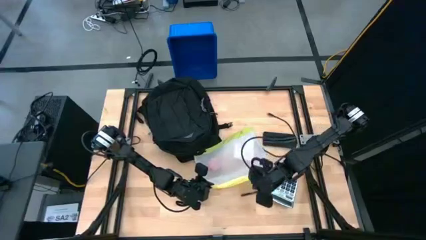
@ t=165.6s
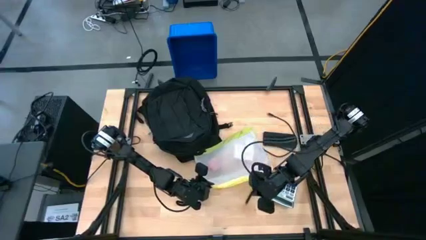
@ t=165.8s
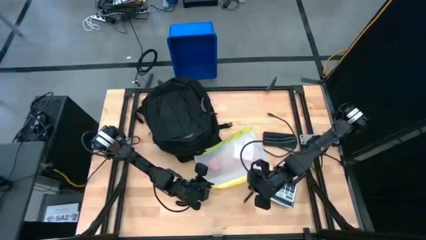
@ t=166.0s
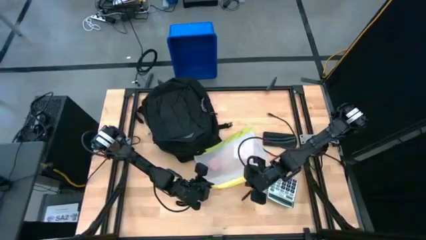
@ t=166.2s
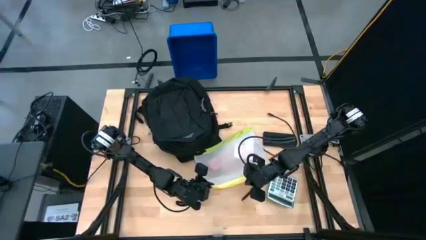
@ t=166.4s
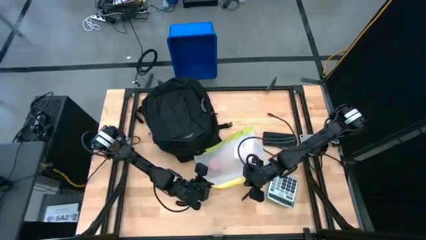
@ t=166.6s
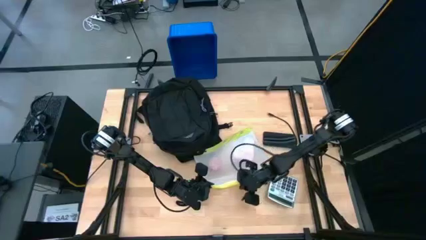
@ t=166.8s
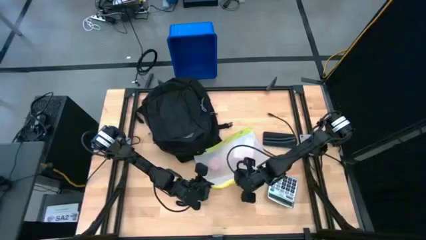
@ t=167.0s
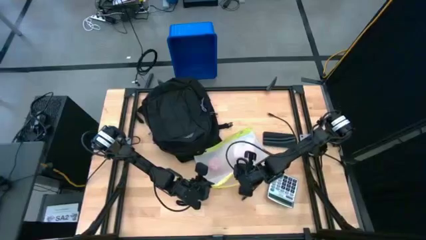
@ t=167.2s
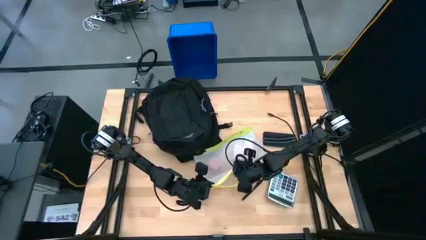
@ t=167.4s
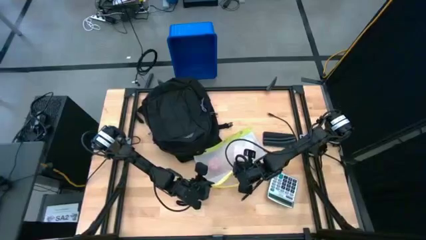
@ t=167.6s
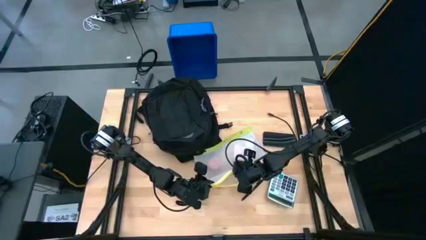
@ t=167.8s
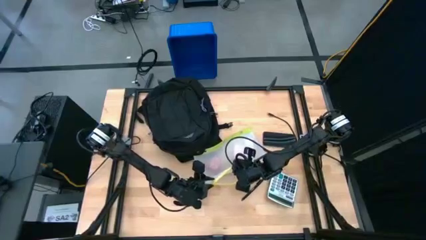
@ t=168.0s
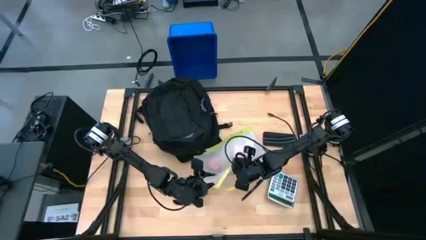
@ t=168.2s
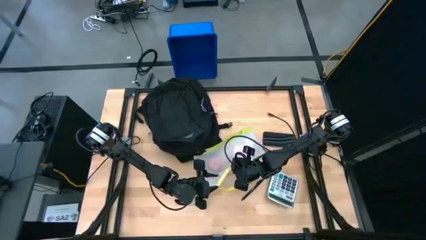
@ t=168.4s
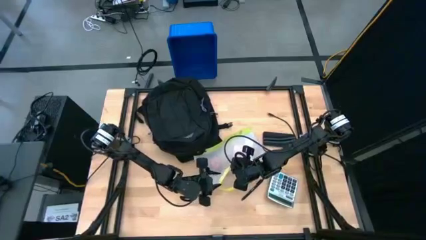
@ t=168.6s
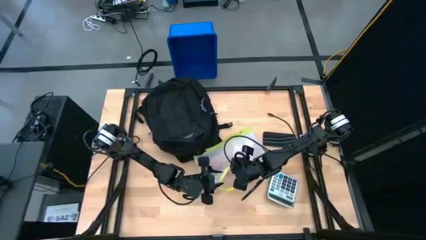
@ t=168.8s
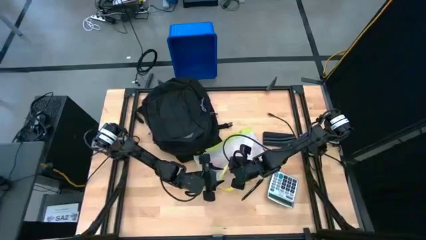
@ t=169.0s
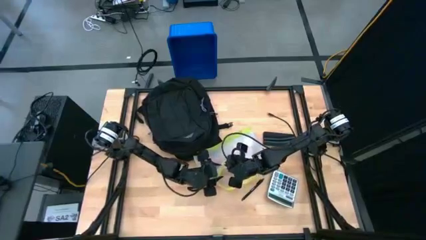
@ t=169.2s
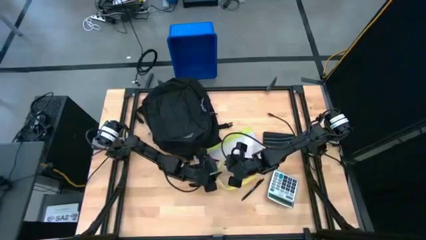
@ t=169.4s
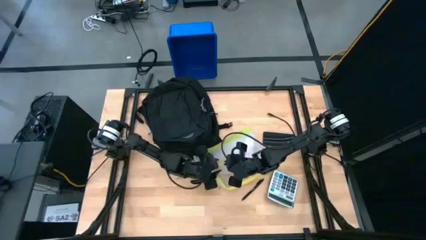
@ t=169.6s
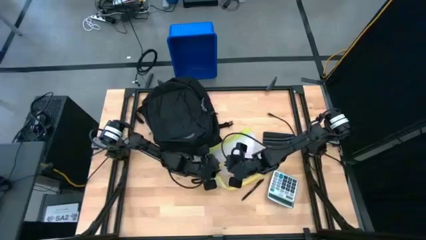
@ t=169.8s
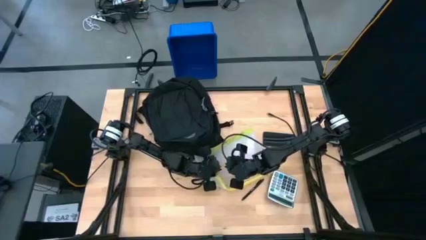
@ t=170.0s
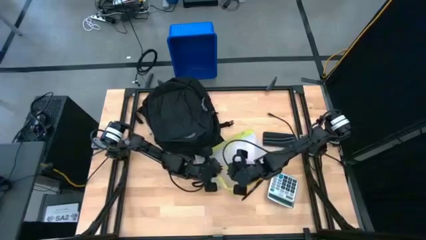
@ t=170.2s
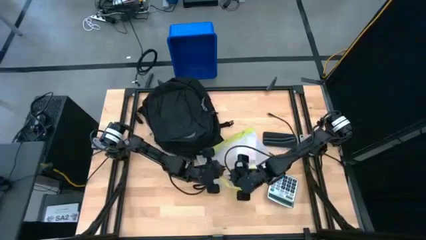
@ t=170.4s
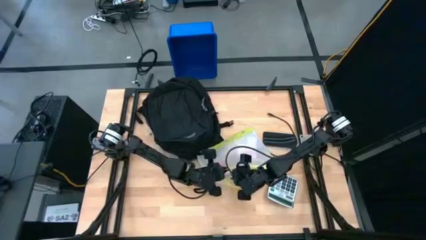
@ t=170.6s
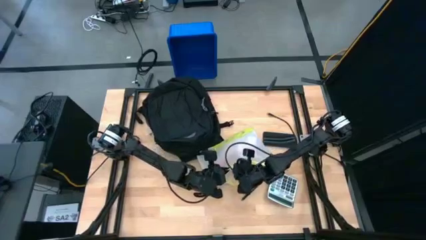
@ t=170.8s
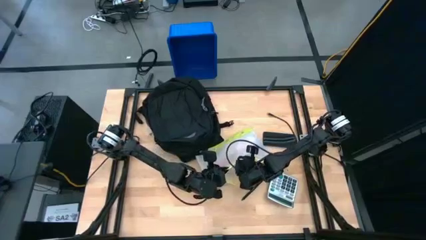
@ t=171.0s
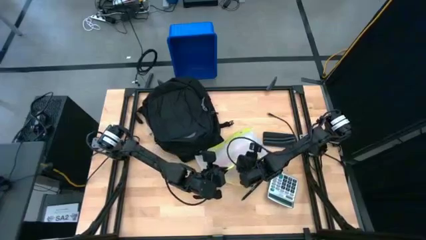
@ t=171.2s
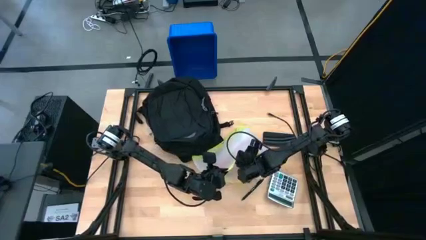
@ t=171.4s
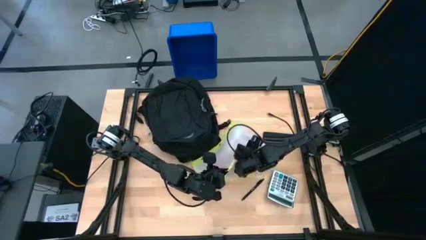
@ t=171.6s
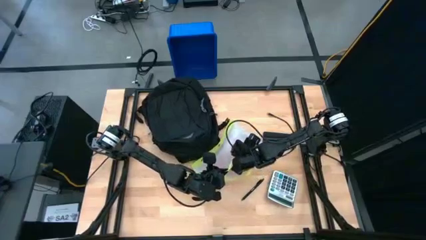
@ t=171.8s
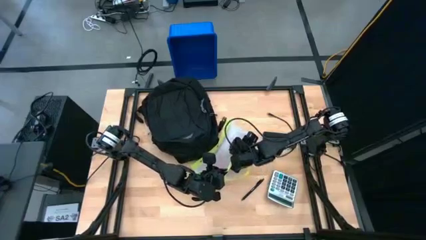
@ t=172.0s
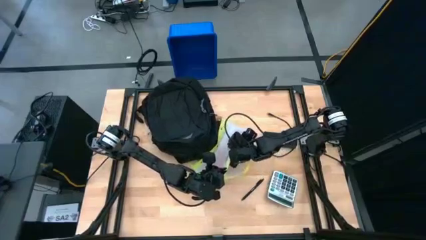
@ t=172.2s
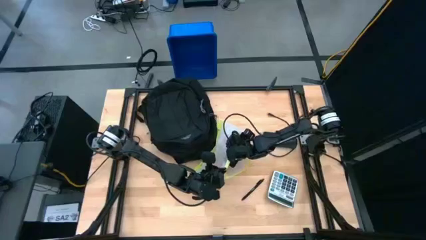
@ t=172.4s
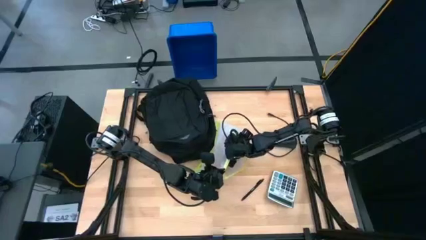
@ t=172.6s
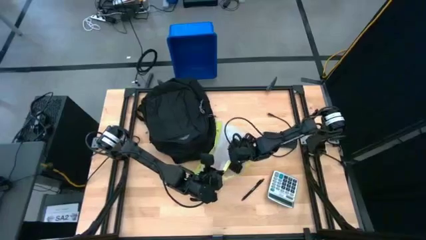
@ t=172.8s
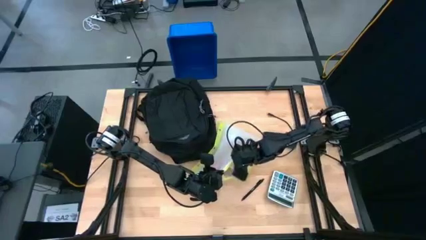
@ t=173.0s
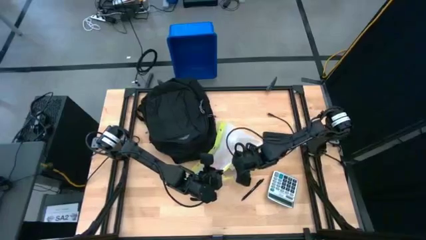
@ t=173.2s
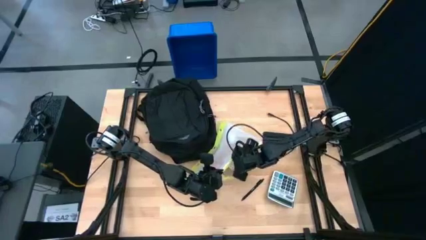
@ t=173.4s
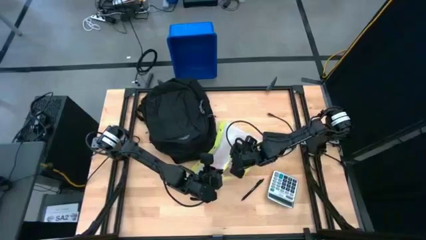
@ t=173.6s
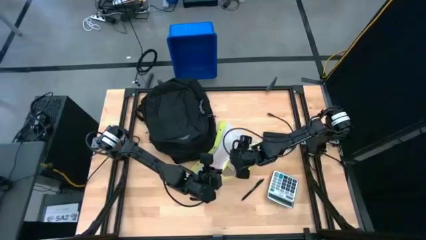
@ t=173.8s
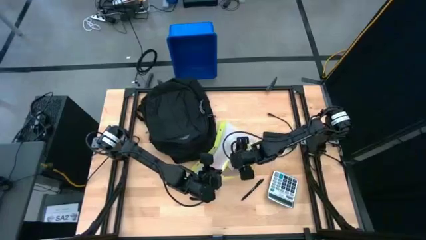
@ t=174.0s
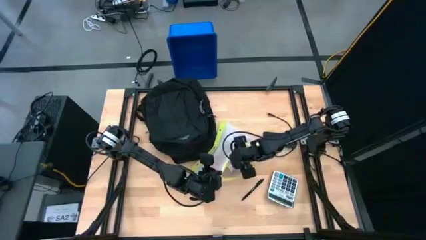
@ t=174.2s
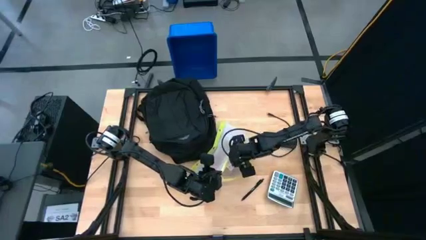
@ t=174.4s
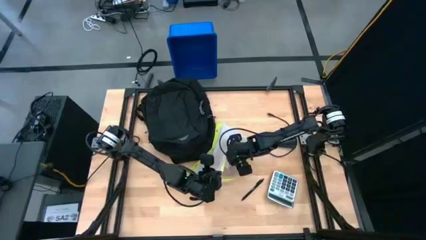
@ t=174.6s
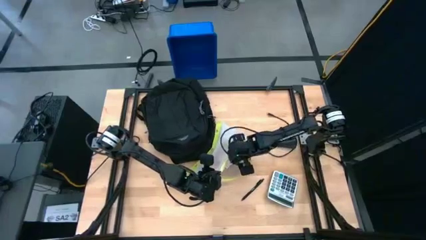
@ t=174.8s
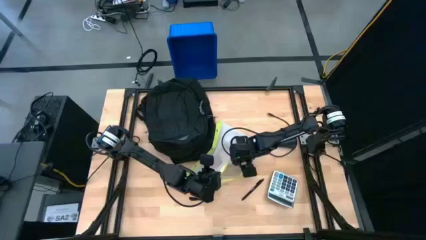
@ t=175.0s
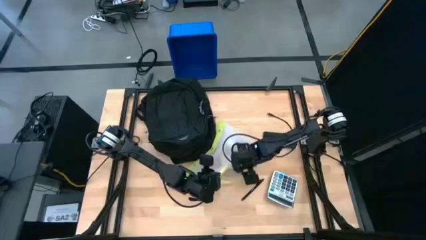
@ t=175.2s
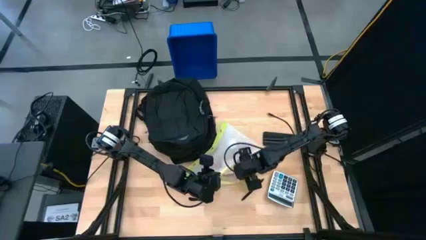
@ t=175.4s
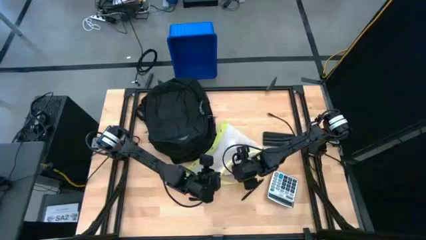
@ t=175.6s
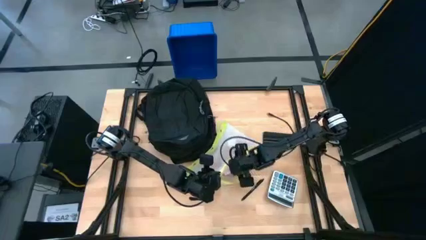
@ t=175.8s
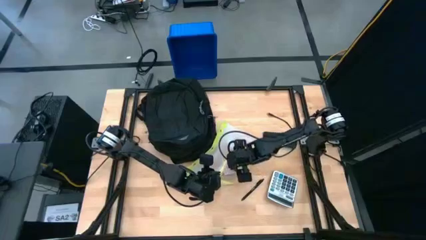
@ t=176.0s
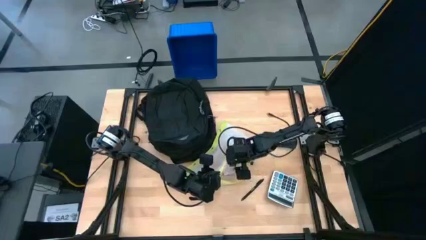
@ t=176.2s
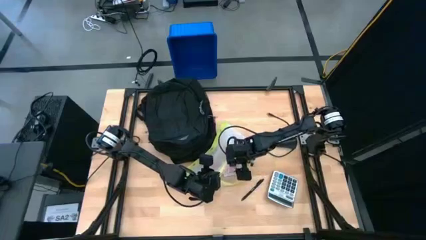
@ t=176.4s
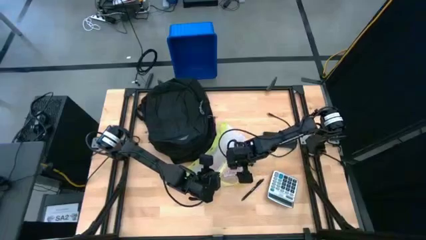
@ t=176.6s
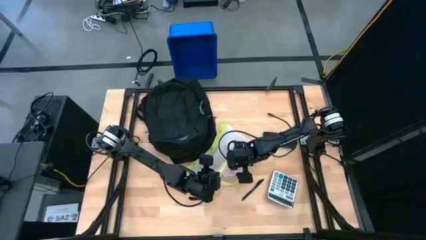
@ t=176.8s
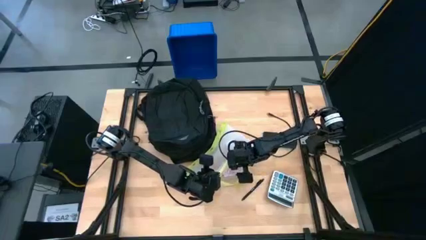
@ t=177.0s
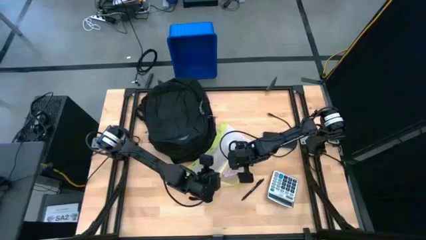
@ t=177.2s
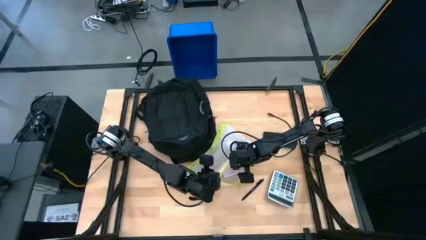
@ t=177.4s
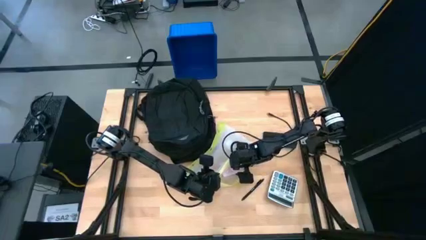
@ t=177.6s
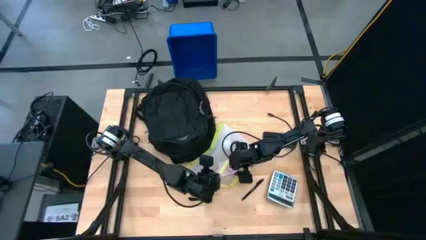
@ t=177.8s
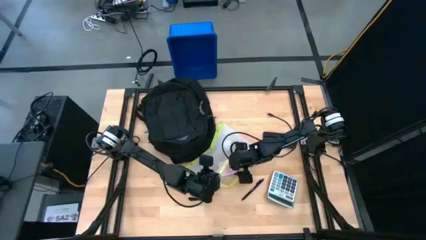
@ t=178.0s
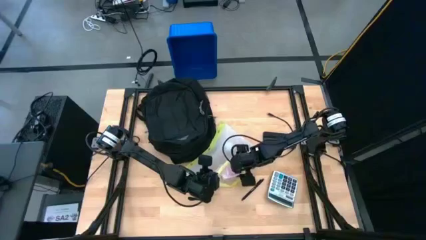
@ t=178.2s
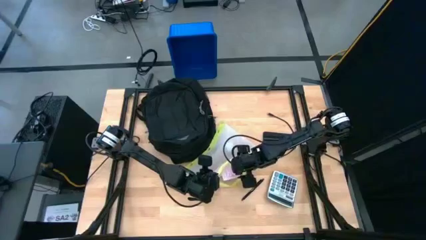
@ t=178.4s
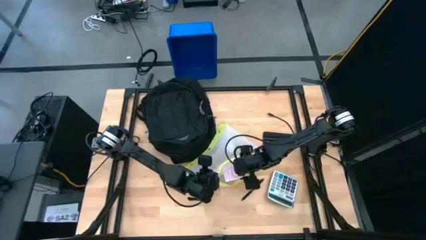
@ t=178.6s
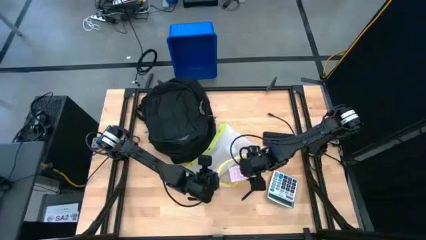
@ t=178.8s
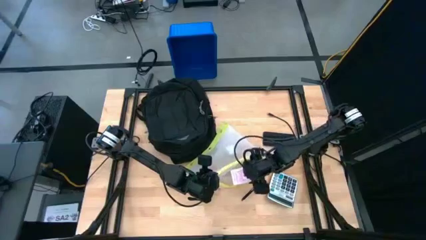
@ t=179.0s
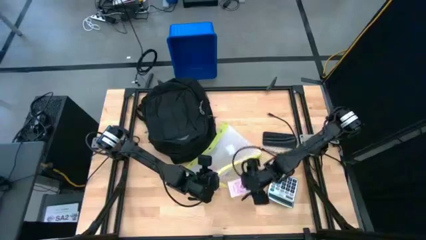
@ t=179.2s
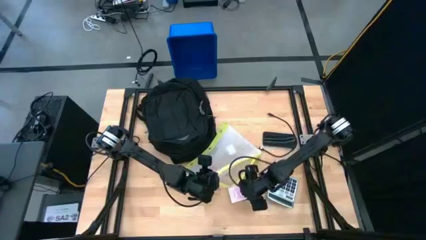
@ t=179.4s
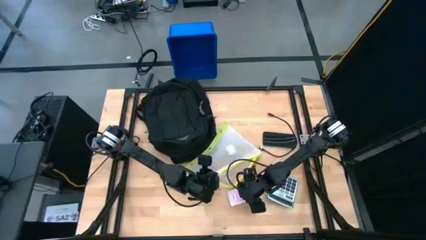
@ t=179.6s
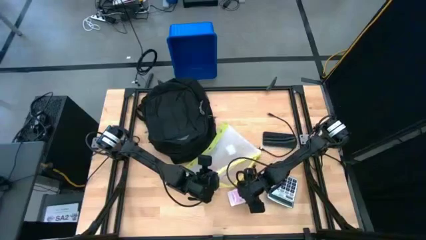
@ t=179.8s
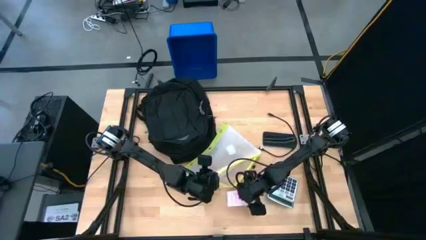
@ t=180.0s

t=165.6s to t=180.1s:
Task: Unpack backpack
Remove the deck of cards from the zip lock bag

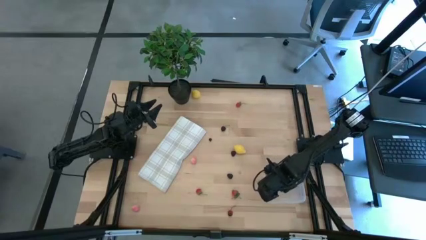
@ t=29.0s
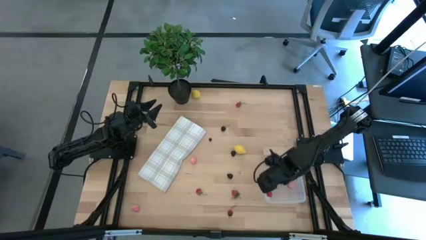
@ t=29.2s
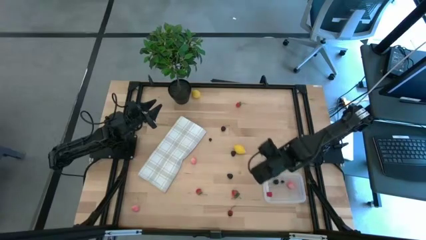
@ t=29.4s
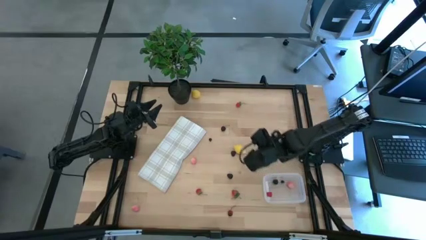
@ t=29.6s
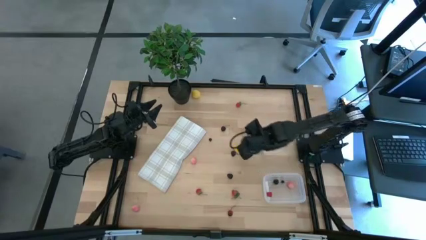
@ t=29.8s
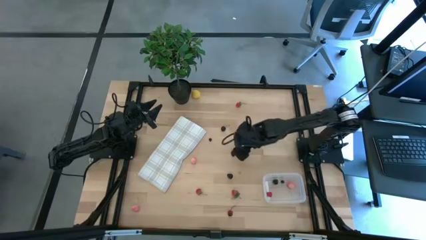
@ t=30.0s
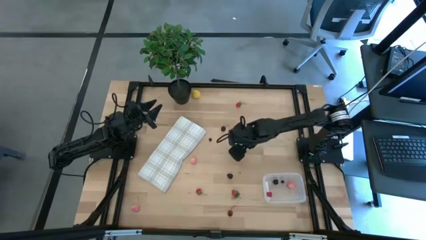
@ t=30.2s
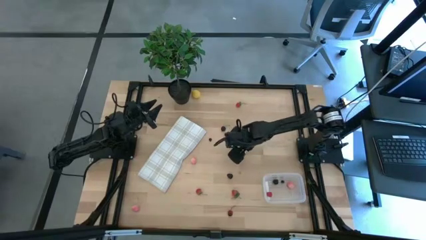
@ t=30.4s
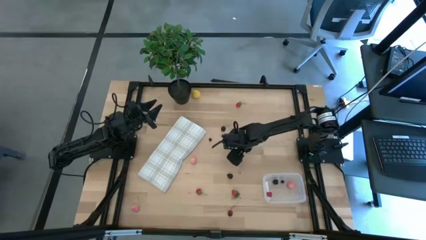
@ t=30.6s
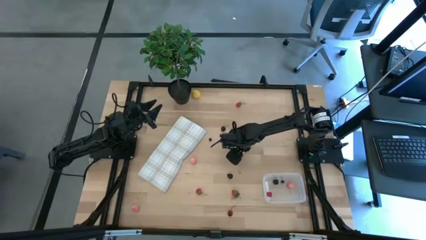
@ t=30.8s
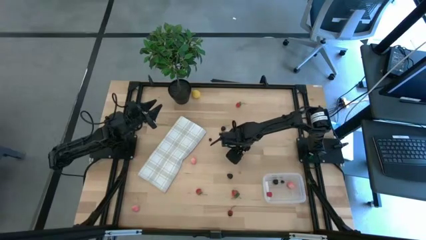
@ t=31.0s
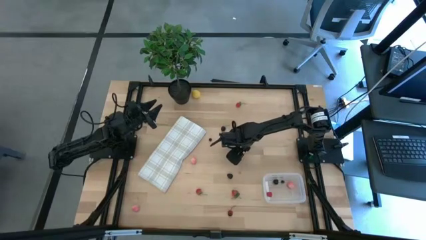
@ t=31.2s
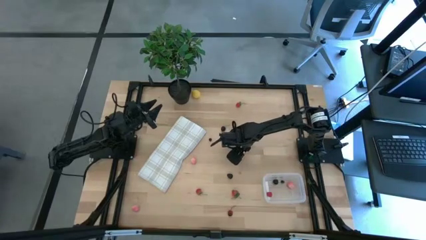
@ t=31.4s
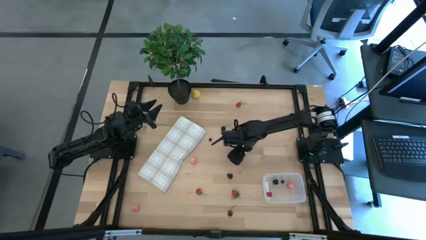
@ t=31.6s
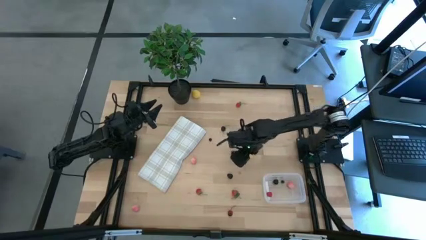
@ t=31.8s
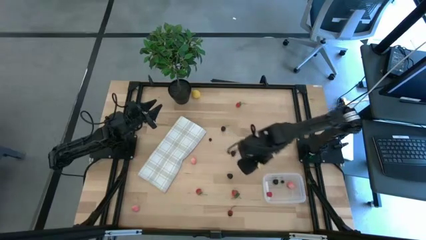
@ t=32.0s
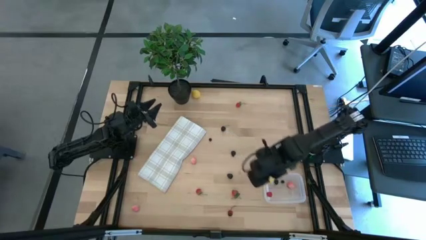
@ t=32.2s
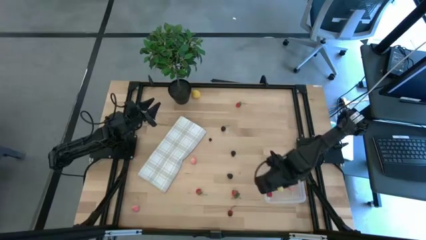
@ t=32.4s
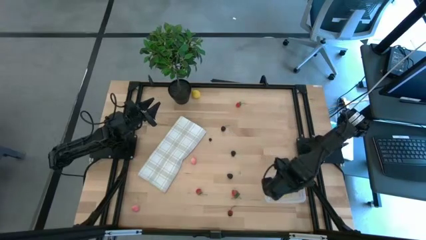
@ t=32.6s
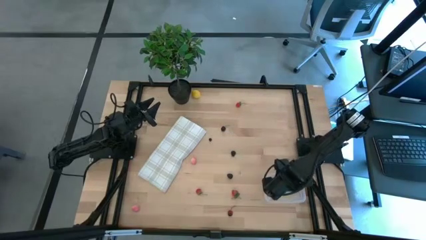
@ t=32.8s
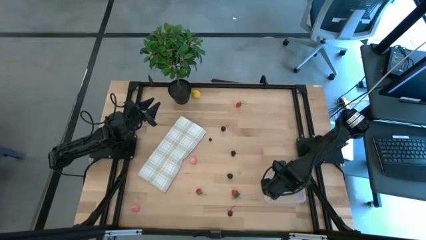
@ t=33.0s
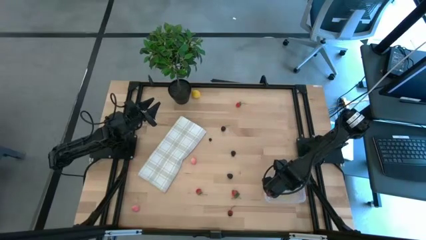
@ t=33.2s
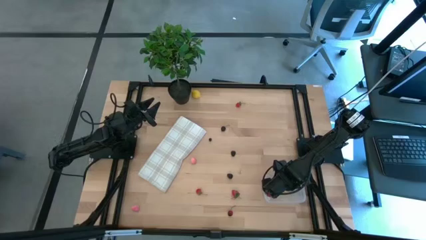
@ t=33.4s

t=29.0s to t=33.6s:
Task: Pick and placing Produce into tupperware
Put the bottom yellow lemon into the transparent bin
